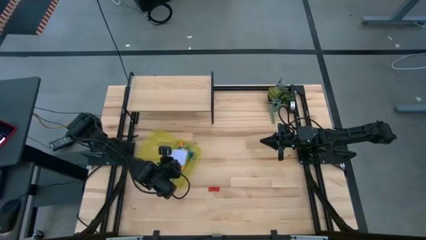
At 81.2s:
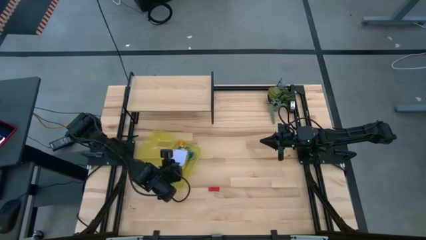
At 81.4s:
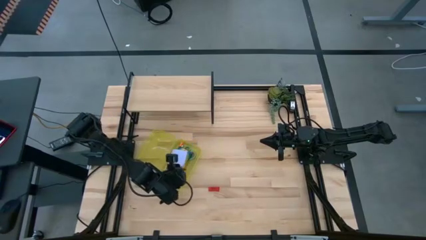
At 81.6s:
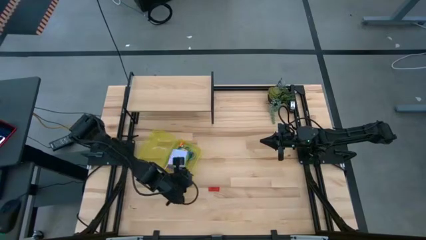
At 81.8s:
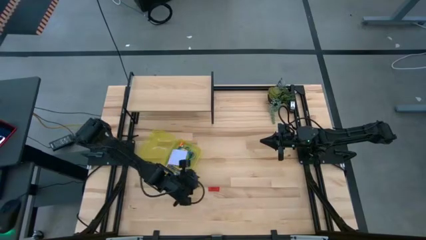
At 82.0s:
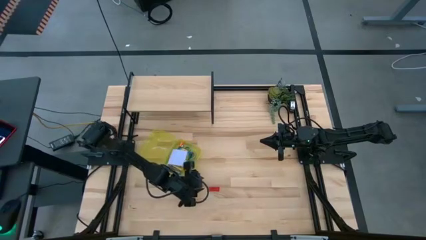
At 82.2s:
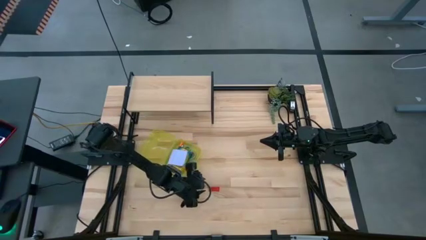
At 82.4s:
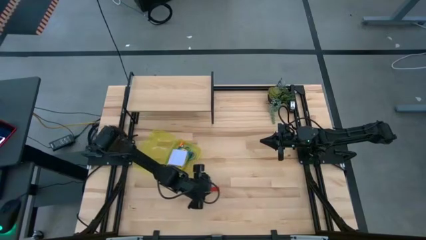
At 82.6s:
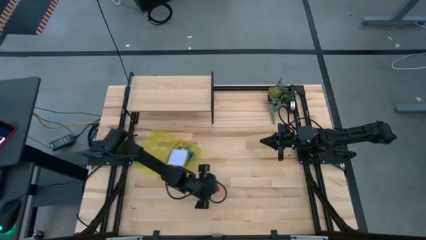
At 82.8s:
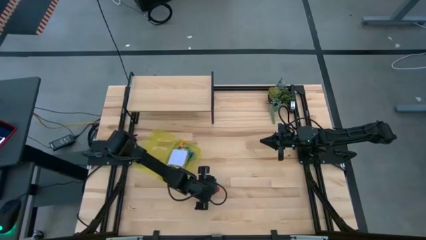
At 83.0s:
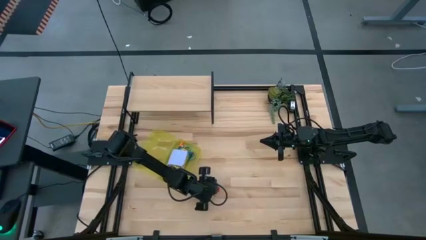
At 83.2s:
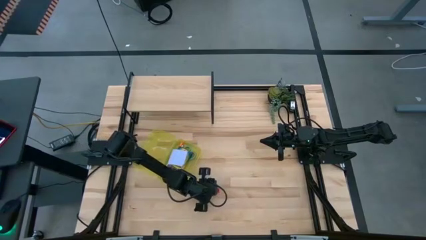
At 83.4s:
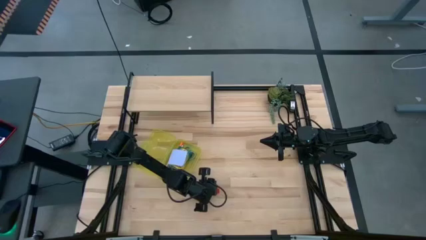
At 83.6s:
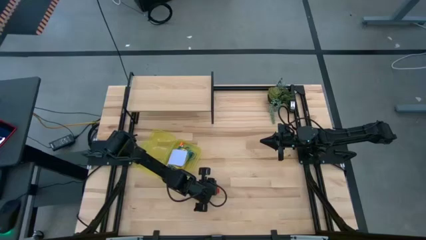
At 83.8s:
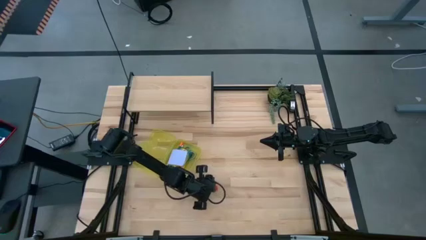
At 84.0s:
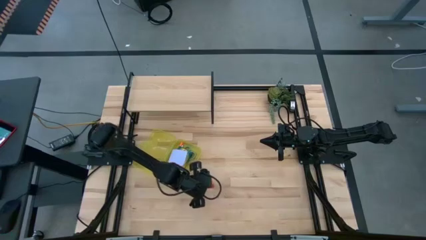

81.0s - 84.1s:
Task: Pack school essentials
Put the red eraser into the yellow supply box

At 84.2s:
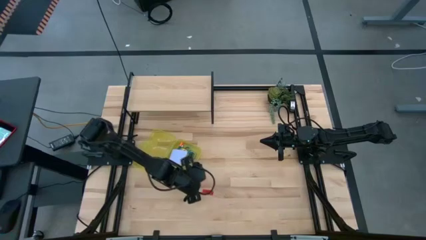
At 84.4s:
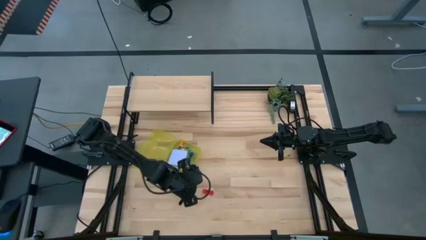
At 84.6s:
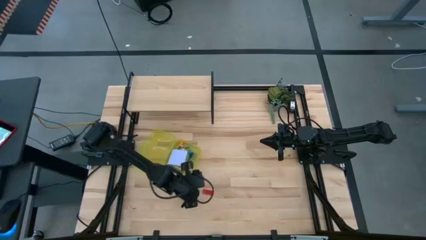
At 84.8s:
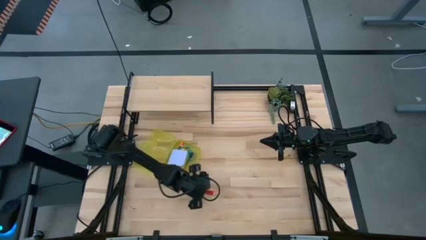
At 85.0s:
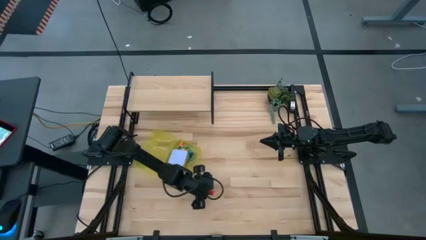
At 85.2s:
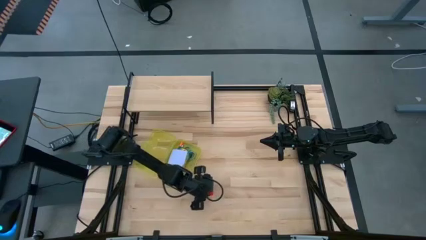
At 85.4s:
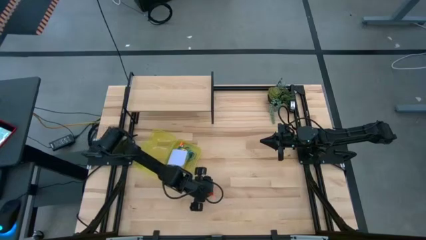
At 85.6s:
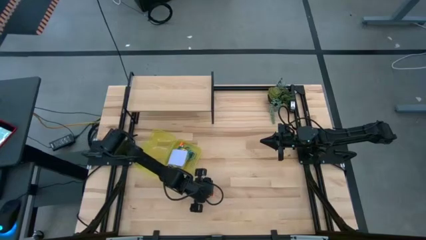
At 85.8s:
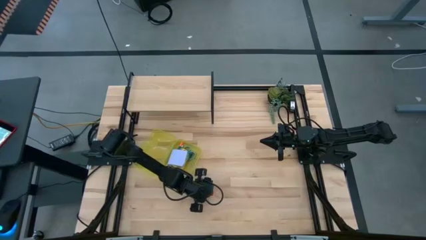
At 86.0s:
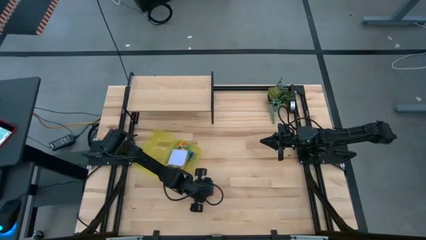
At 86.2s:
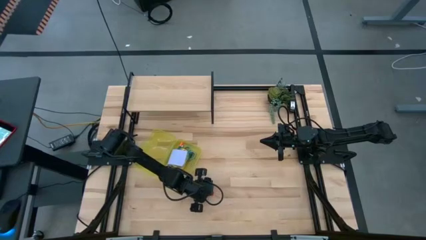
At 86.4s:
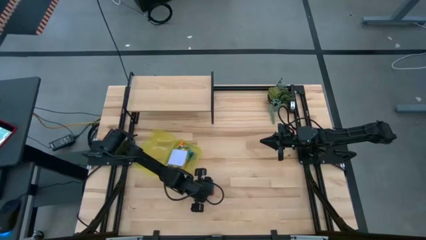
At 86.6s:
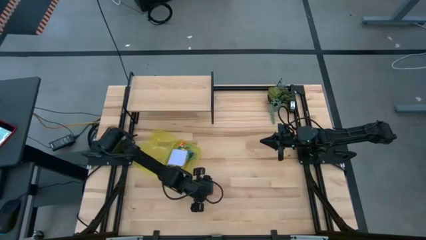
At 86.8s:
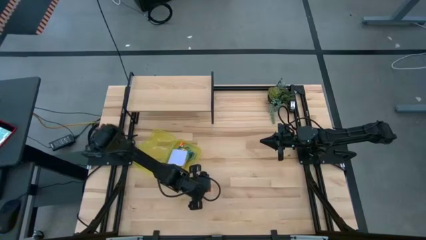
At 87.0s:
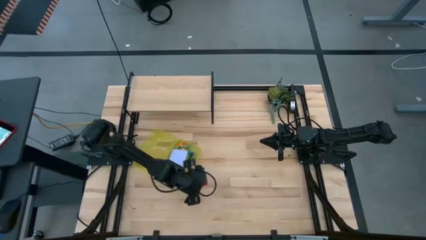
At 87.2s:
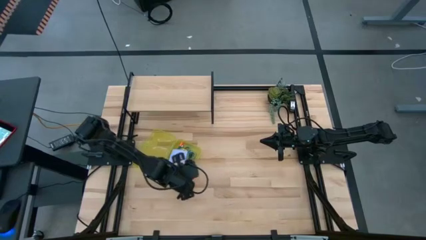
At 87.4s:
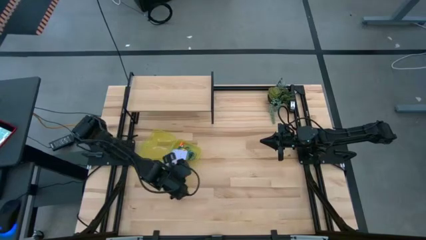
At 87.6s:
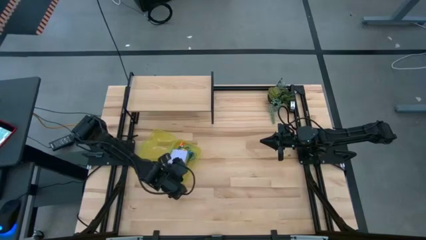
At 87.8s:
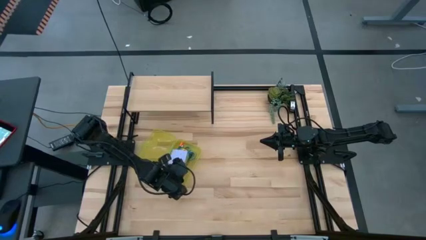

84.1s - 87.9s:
Put the red eraser into the yellow supply box

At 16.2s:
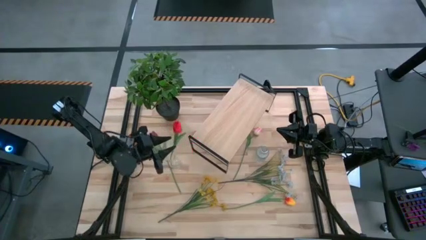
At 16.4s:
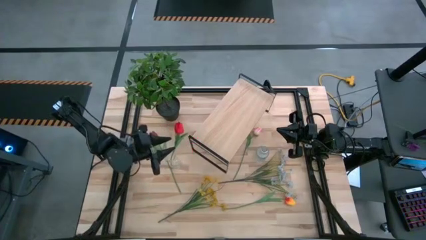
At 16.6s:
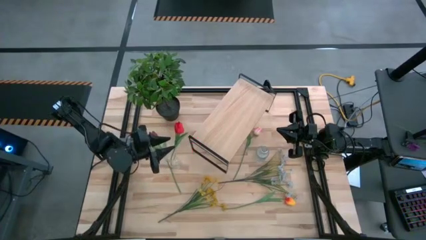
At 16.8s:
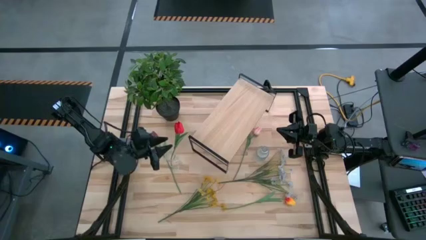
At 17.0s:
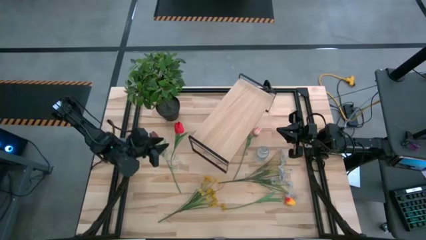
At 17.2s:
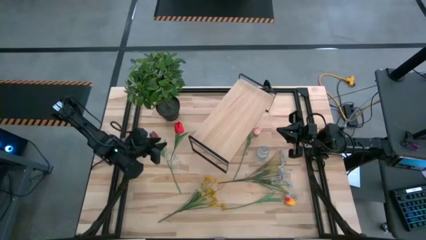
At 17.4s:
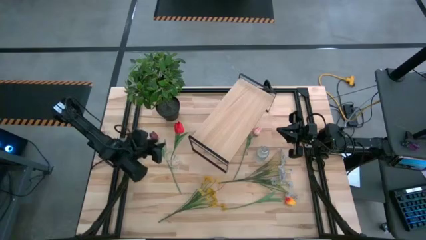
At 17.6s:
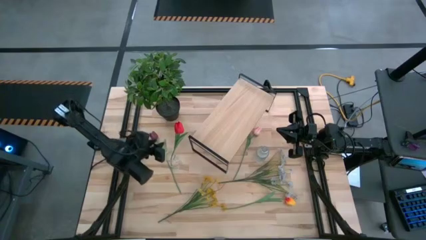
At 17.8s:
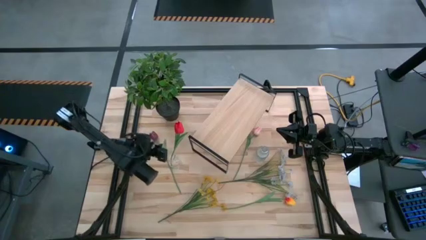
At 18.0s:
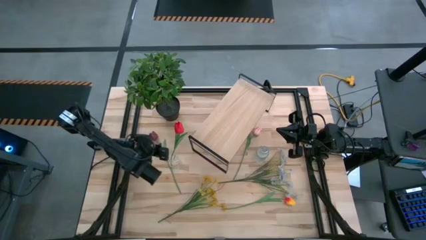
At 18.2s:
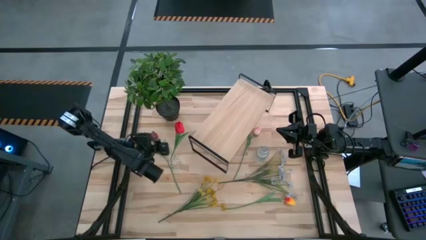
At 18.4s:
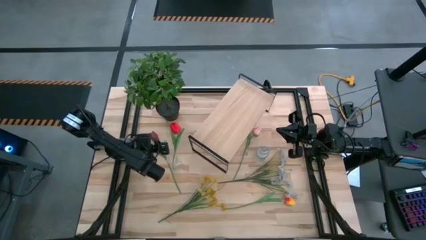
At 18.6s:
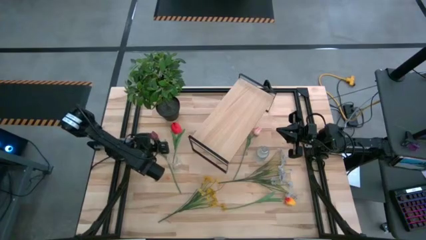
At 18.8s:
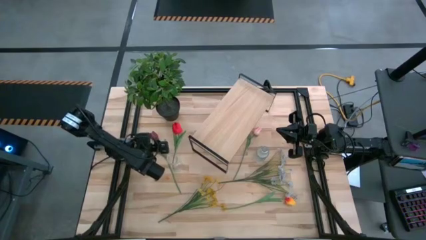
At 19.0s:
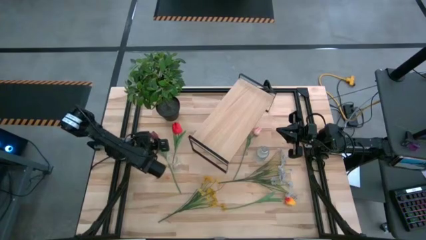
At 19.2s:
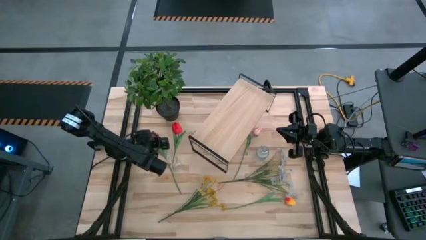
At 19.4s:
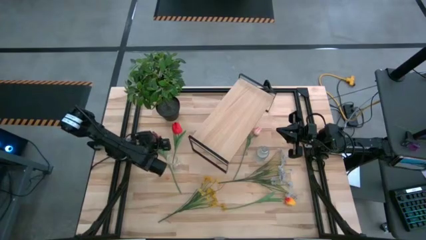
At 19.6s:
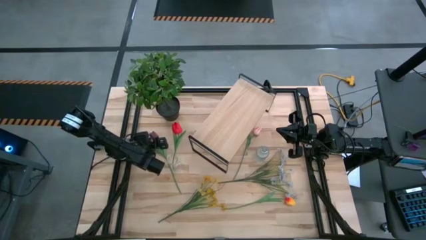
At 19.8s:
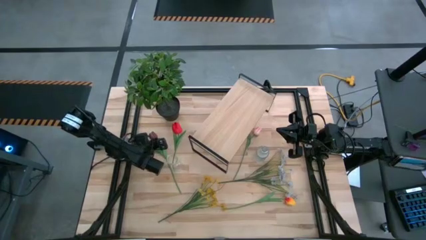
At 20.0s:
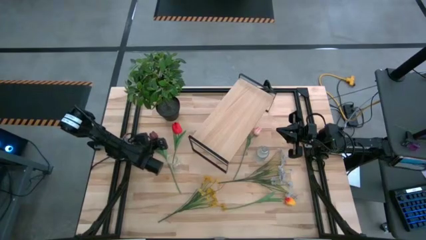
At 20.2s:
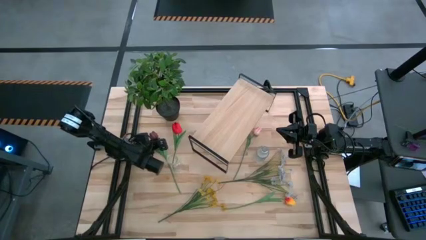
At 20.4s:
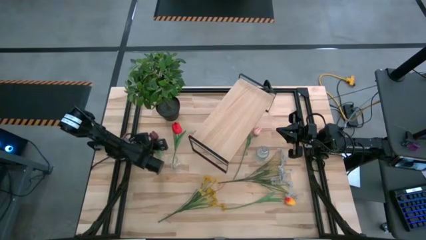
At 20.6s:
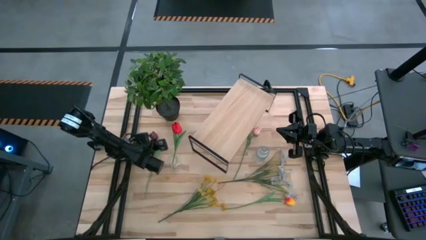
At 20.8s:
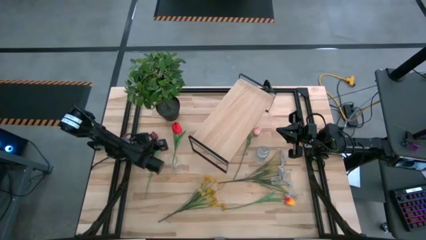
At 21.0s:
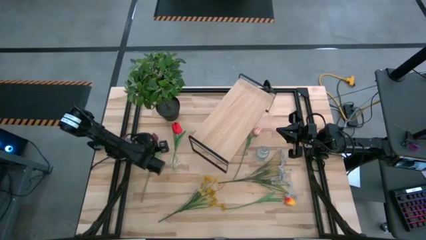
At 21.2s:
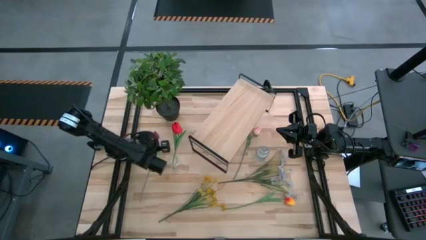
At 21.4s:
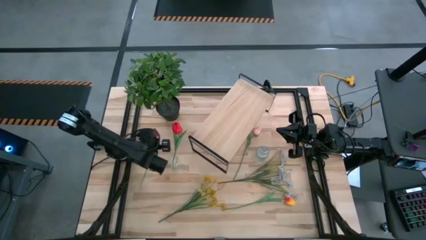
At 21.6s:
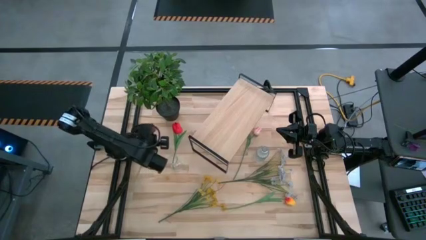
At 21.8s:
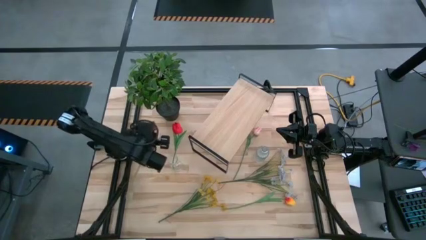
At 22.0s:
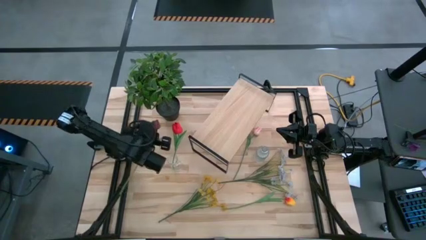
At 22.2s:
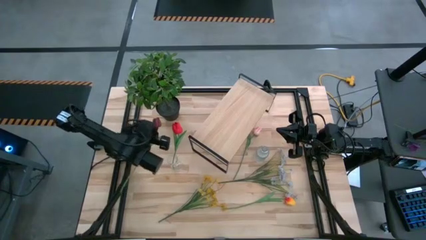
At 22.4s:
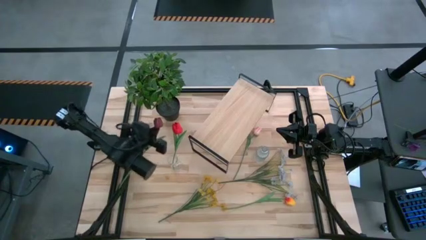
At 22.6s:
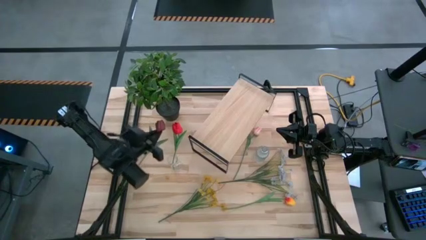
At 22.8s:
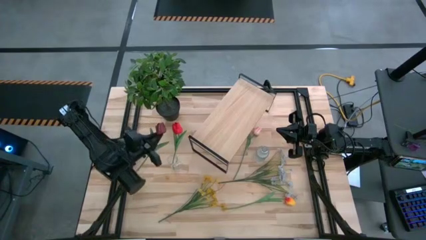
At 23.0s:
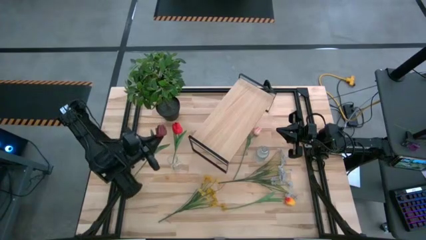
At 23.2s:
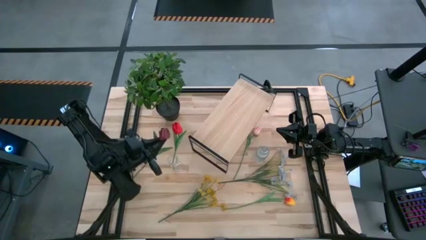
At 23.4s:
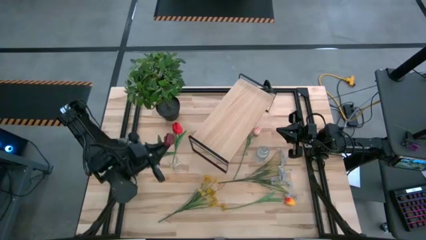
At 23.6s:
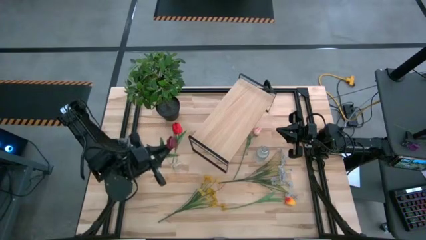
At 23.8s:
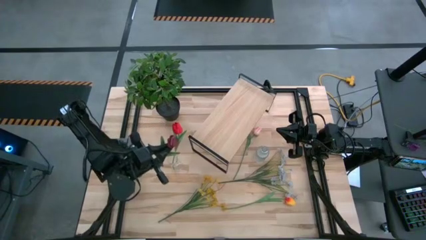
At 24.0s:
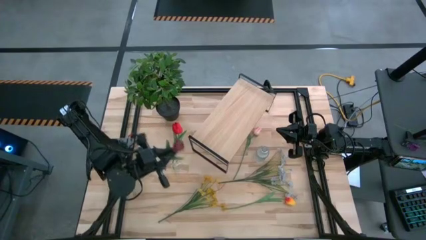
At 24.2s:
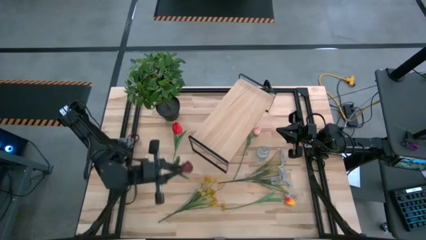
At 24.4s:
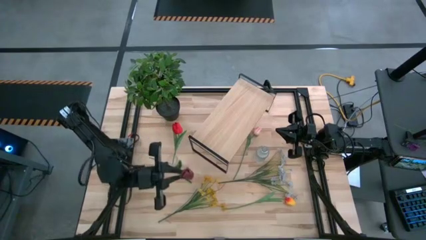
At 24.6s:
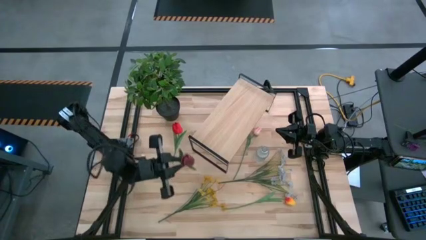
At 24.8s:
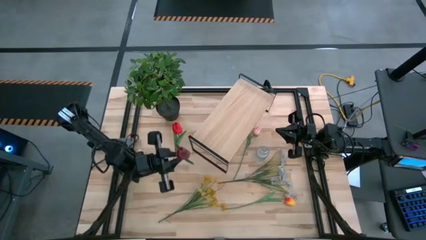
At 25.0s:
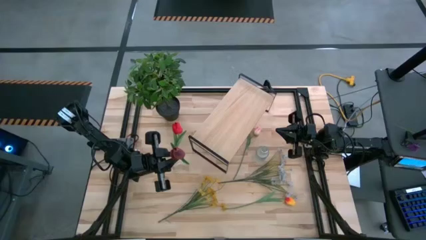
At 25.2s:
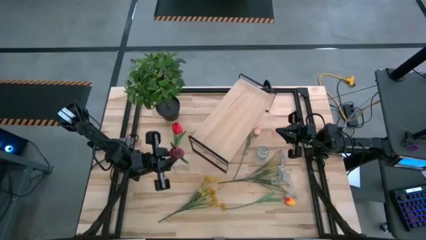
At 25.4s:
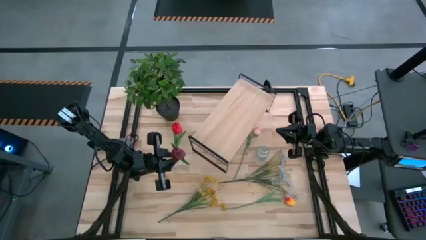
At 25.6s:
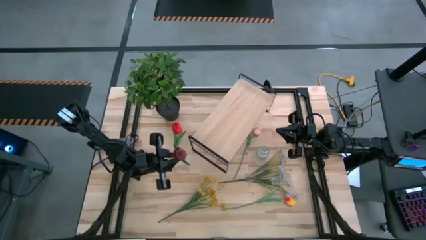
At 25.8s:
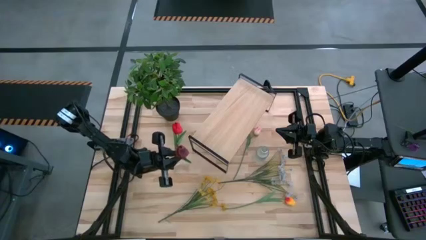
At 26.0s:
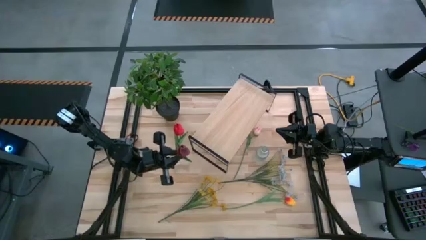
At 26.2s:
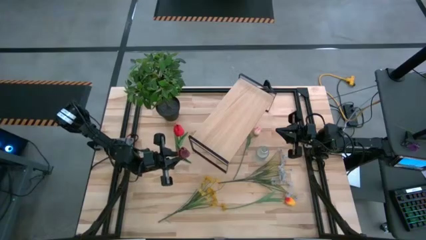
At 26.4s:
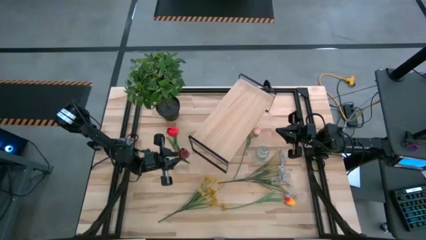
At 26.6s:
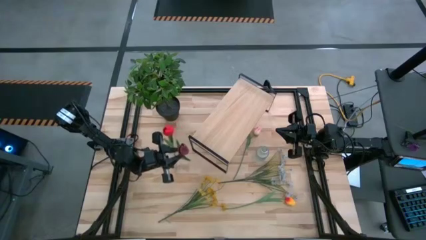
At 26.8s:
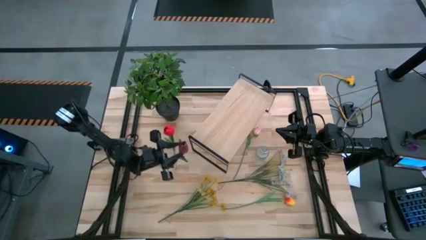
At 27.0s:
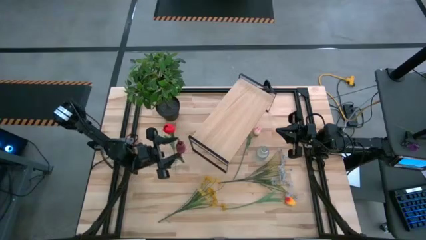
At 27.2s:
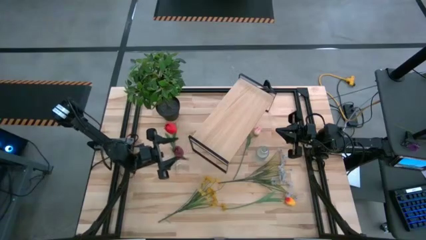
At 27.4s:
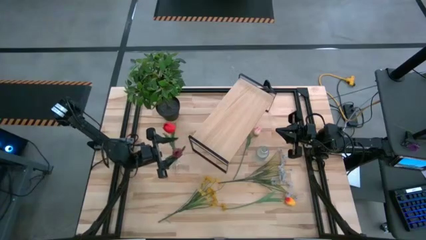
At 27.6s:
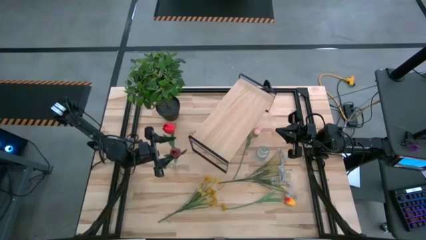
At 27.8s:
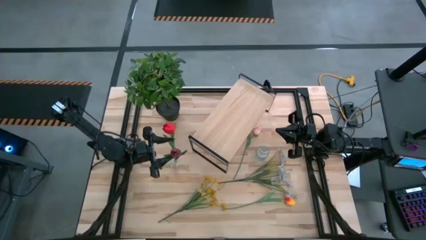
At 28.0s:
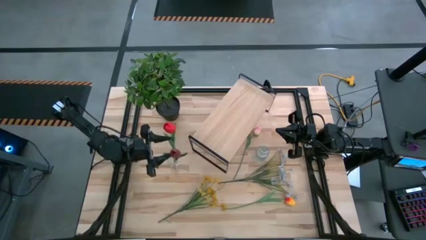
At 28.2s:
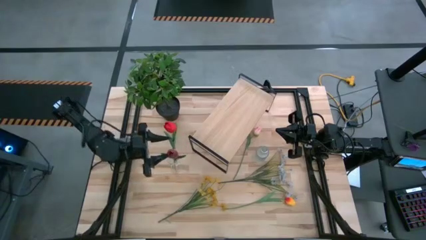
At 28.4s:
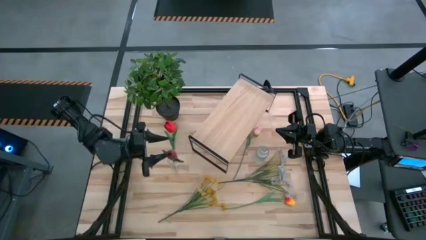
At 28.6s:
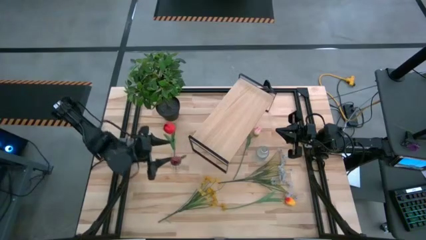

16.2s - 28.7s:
Task: Pick and place flowers into a vace then onto a shelf
Put the dark red flower into the left transparent vase
